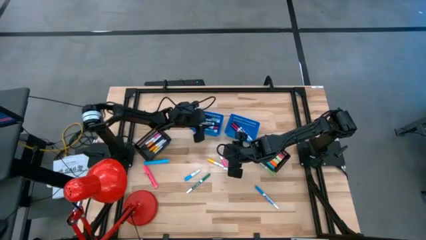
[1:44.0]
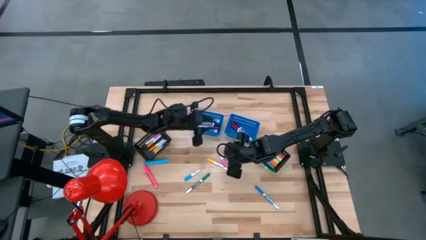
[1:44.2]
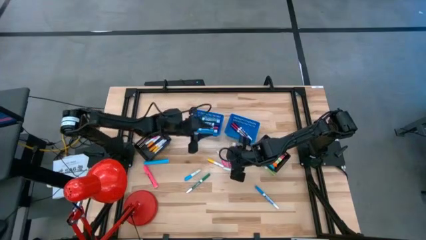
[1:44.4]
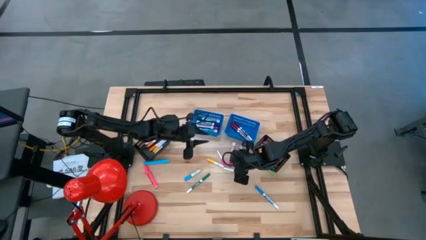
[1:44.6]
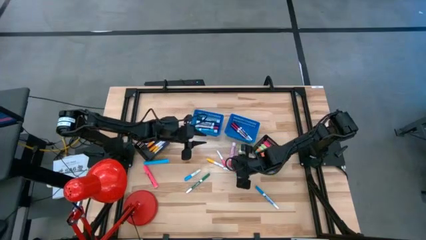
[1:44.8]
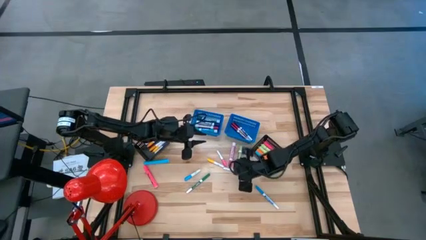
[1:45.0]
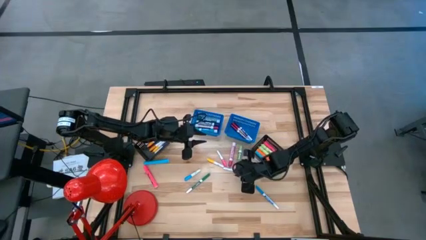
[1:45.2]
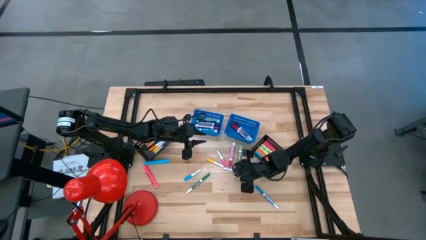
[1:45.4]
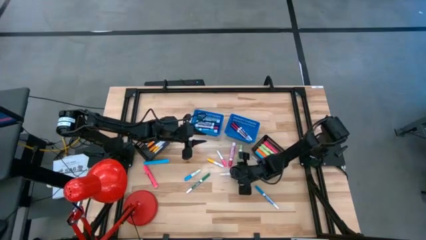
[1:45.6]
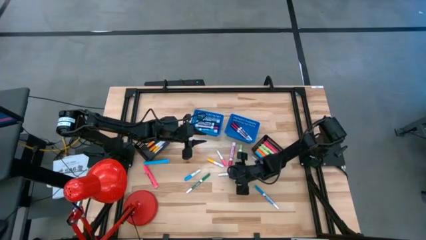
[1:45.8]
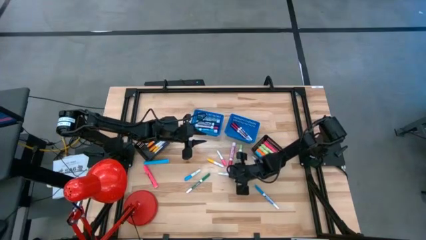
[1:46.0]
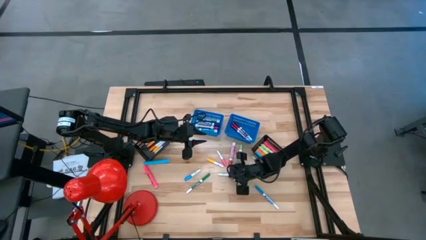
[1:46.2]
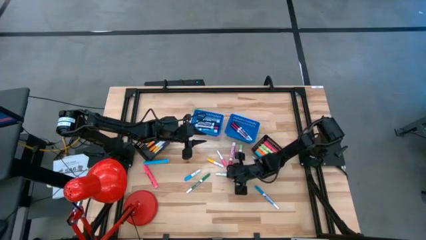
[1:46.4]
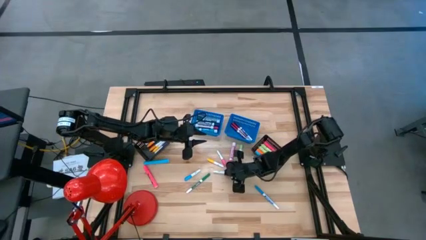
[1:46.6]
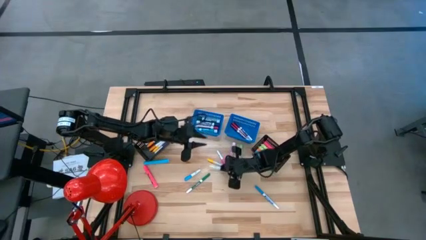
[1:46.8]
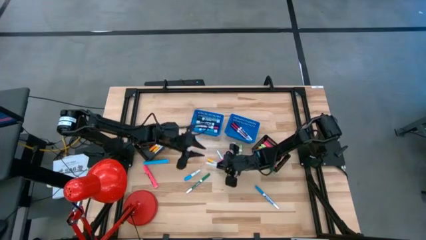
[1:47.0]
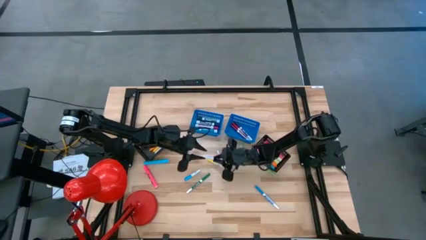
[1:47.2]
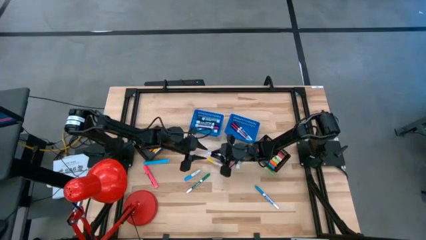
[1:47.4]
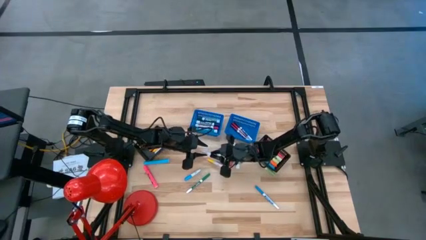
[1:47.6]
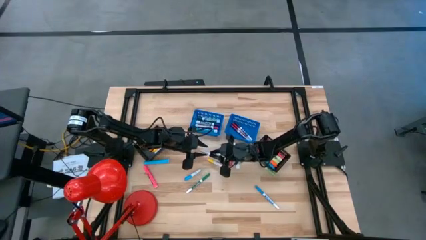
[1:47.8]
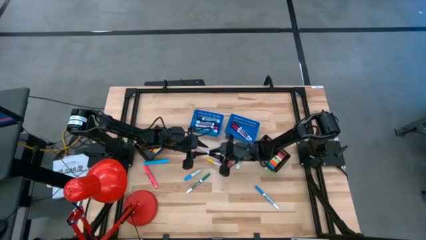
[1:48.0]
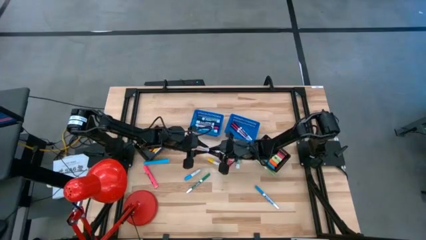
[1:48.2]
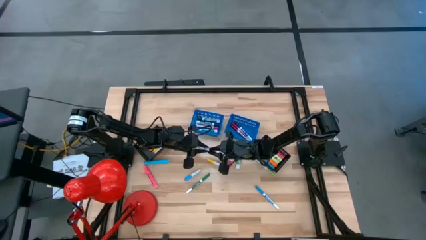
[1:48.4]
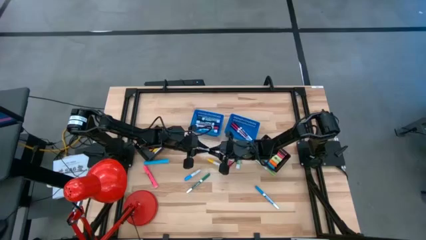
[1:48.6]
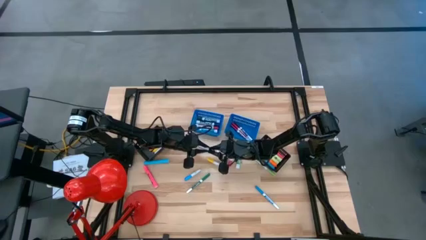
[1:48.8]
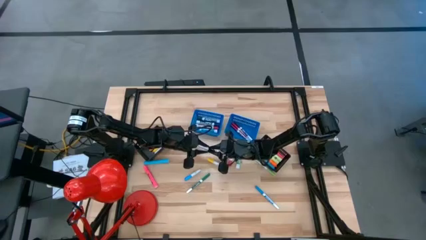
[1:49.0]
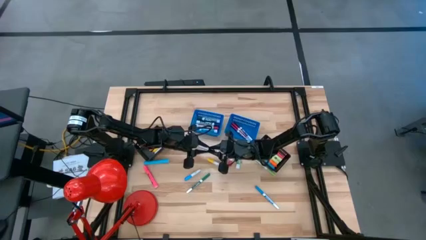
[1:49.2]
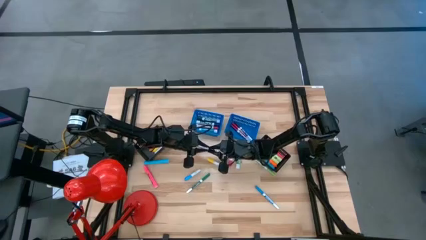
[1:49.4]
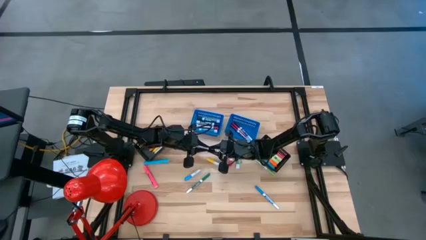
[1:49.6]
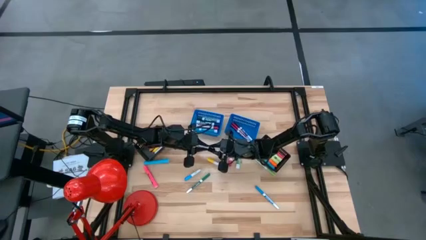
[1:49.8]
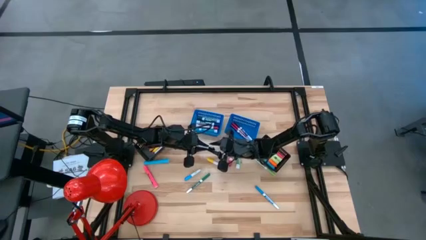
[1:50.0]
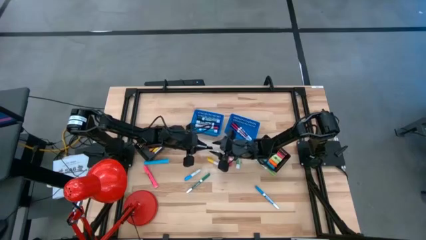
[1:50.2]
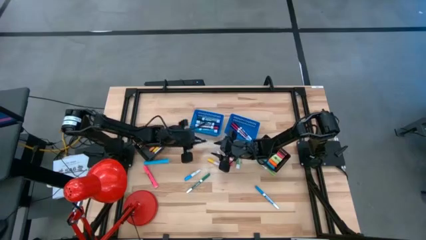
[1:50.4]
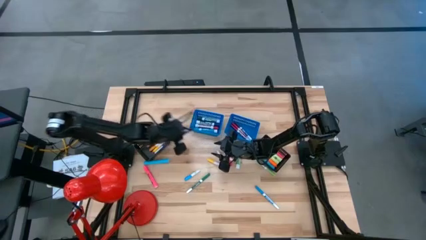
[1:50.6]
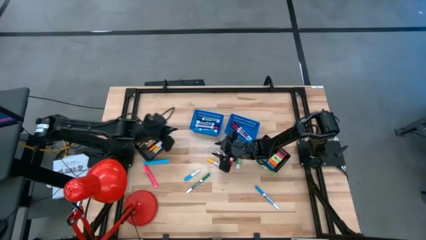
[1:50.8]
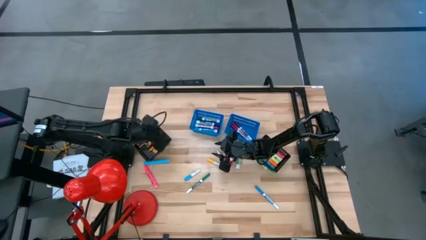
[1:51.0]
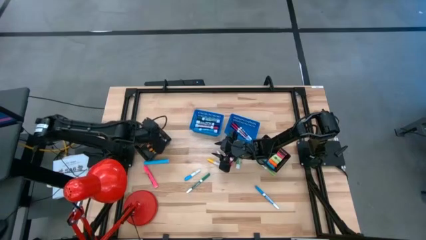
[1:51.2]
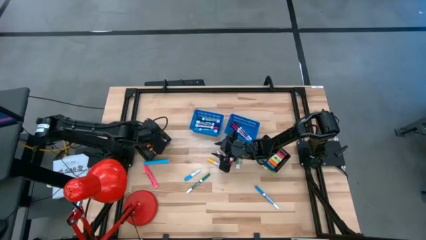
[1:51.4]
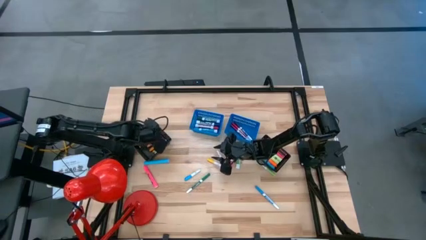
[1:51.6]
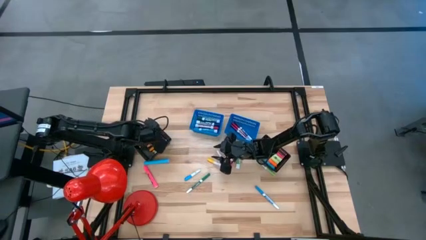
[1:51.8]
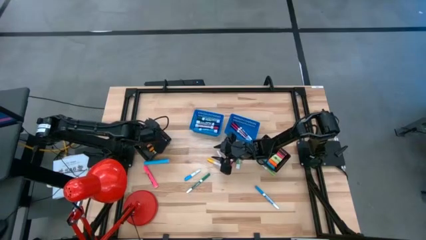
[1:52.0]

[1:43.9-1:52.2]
Task: Pick & Place Markers
Put the black water marker into the left black bin

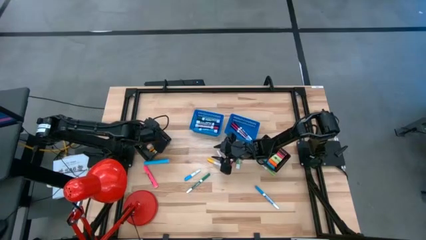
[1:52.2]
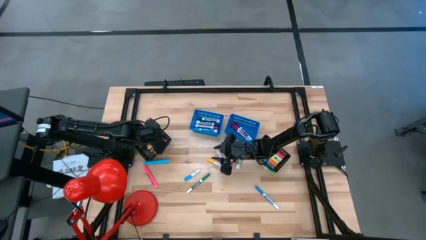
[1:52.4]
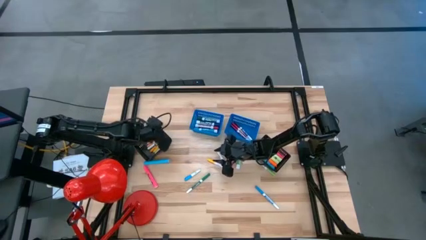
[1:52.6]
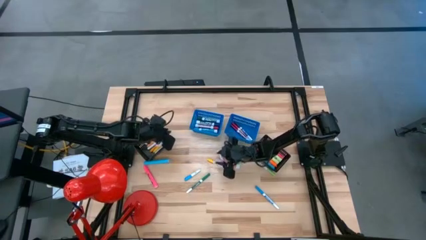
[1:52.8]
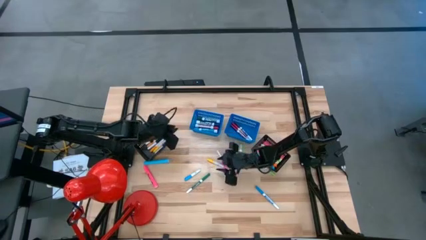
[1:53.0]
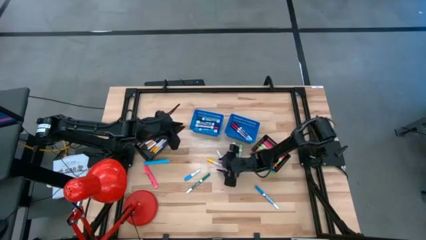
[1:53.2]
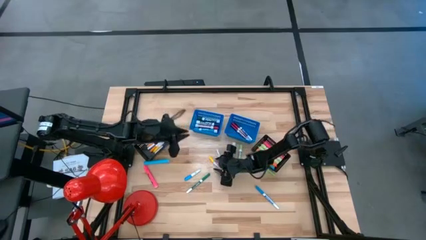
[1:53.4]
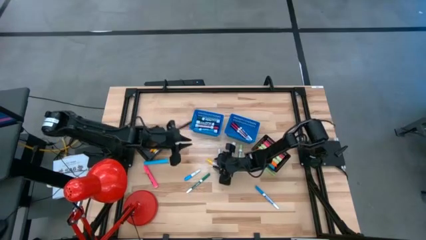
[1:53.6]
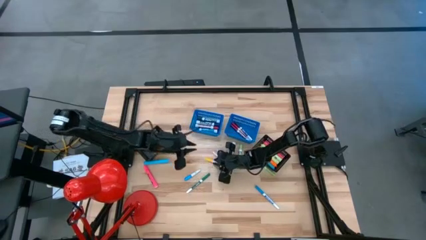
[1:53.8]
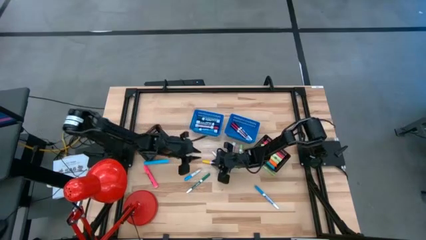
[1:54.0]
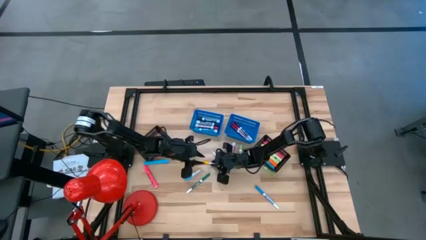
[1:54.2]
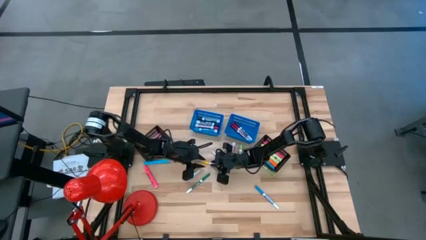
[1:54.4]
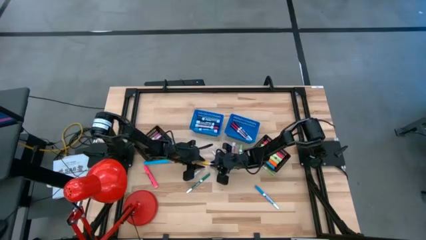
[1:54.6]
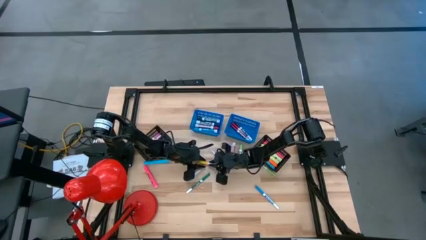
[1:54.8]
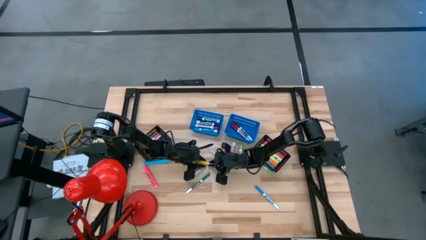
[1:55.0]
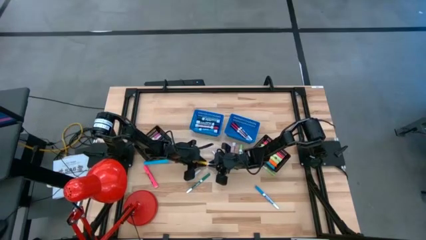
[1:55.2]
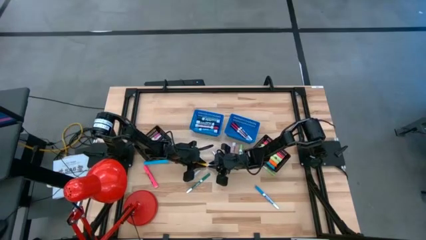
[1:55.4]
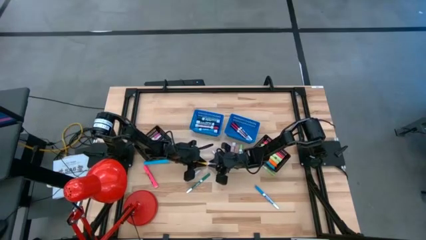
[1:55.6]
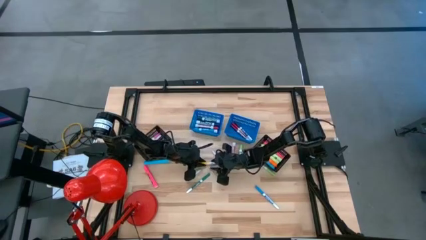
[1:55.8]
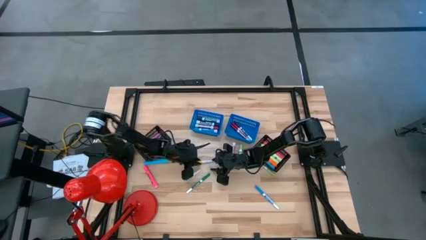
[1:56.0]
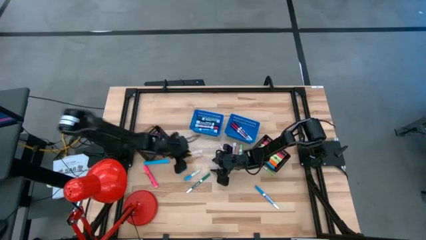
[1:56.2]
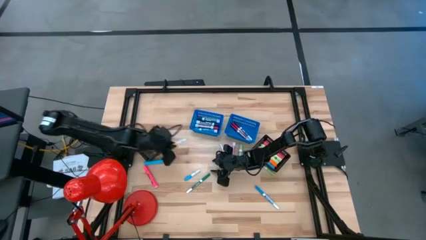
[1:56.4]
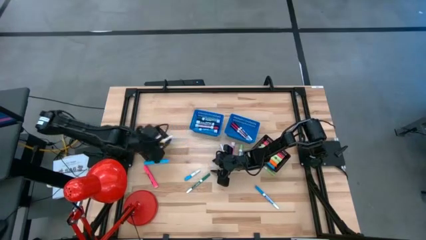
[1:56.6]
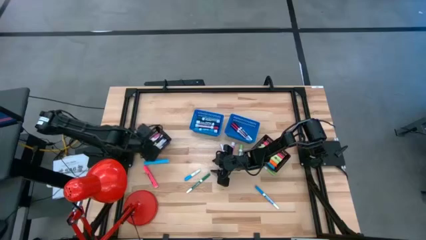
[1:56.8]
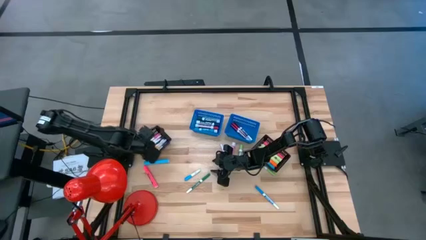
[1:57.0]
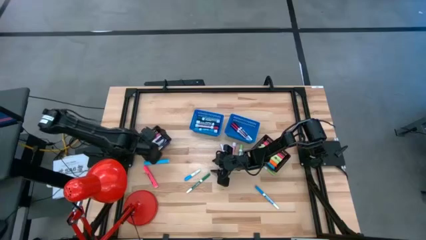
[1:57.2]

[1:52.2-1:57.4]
Put the yellow water marker into the left black bin

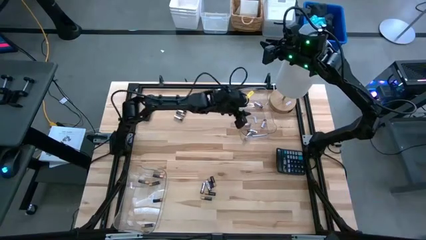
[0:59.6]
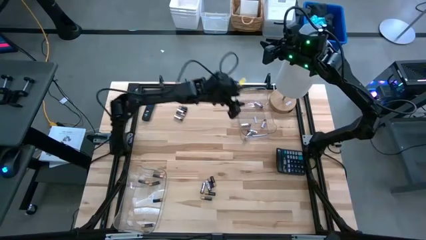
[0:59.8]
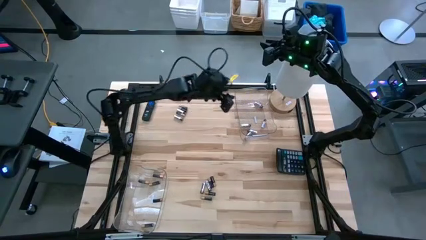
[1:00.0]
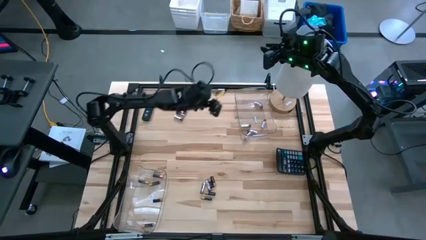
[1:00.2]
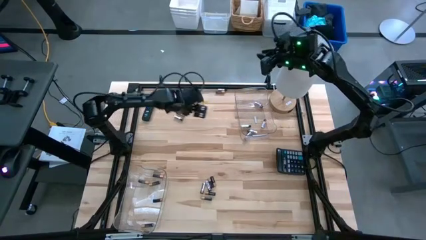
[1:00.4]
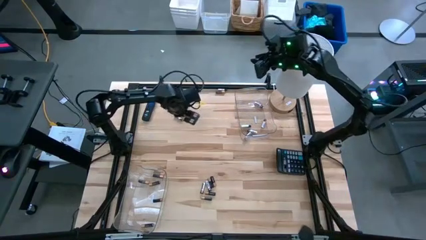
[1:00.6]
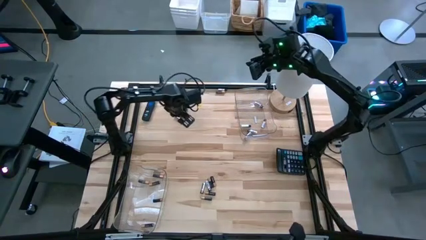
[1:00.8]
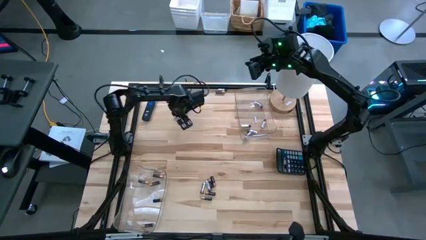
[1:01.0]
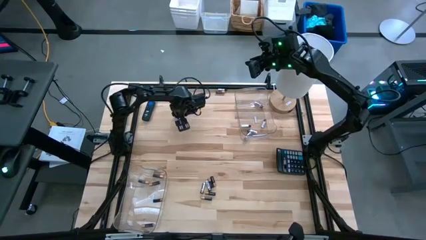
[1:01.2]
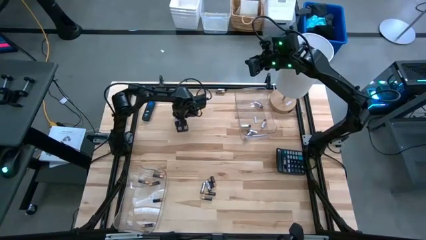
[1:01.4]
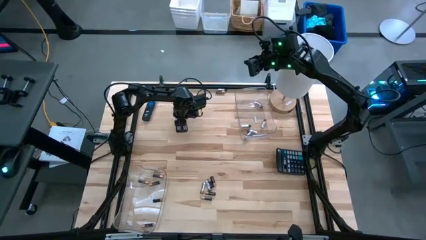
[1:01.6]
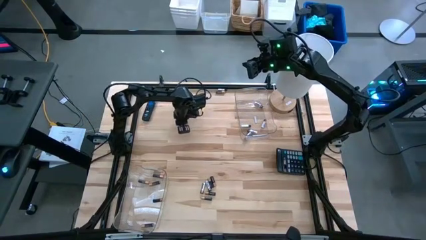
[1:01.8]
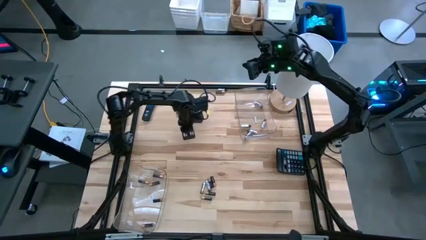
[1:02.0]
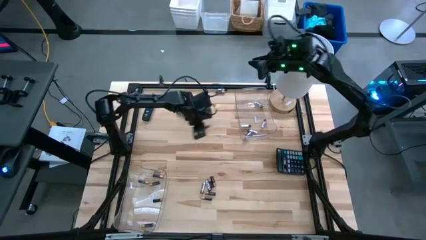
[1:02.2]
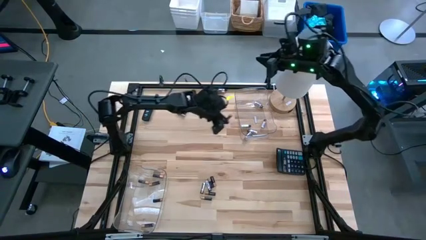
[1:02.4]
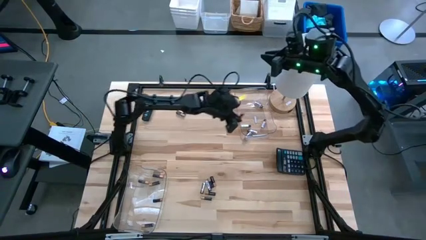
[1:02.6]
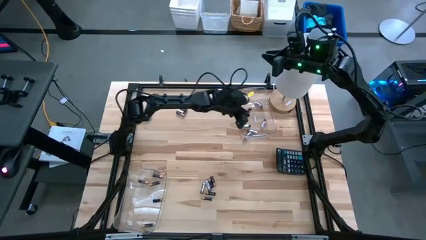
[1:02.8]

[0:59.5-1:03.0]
Task: Sort batteries
Put the silver battery into the right transparent bin
